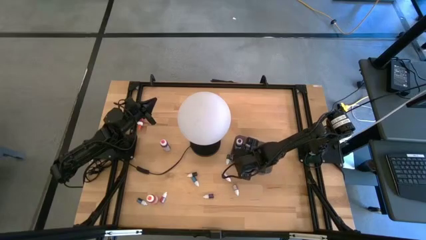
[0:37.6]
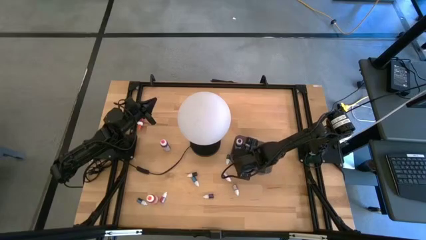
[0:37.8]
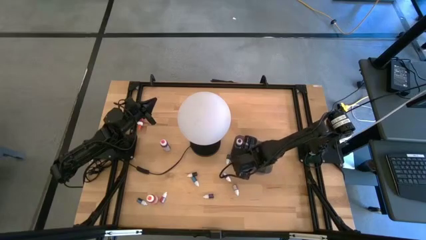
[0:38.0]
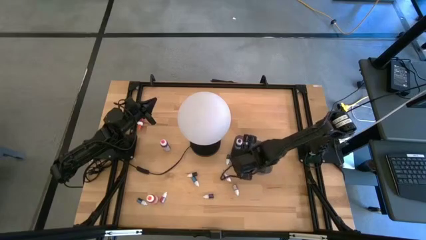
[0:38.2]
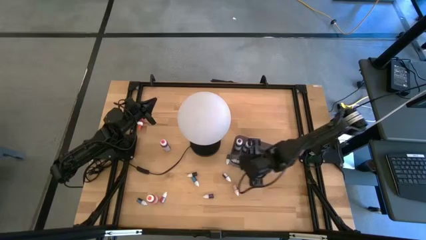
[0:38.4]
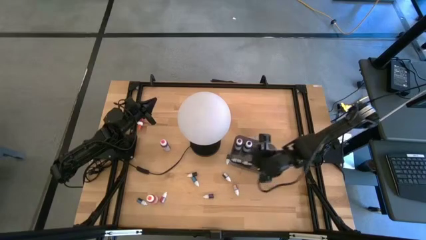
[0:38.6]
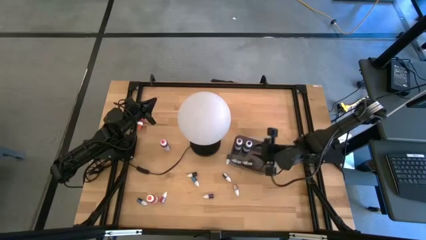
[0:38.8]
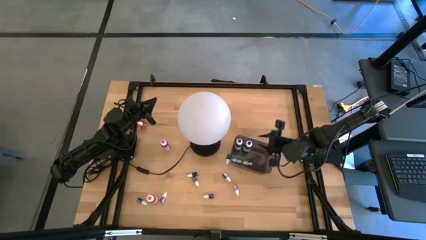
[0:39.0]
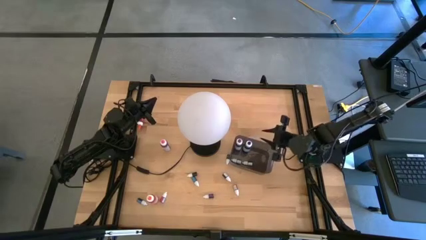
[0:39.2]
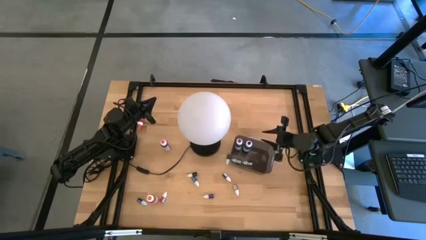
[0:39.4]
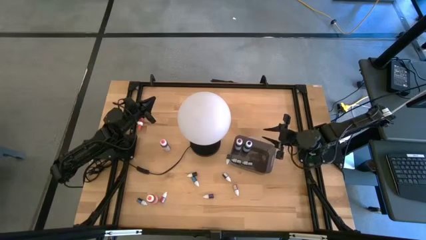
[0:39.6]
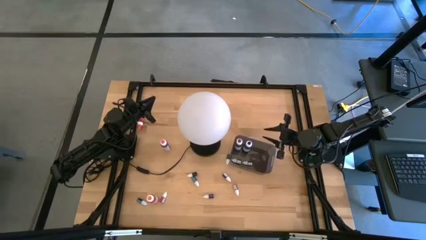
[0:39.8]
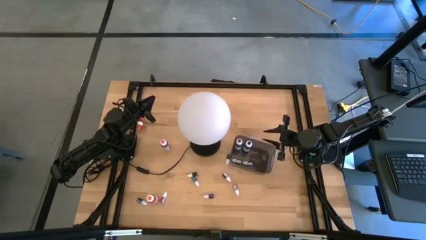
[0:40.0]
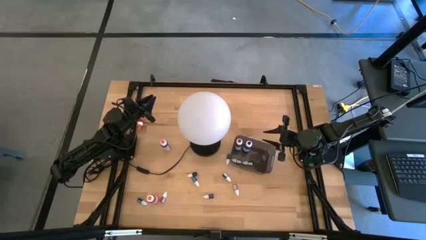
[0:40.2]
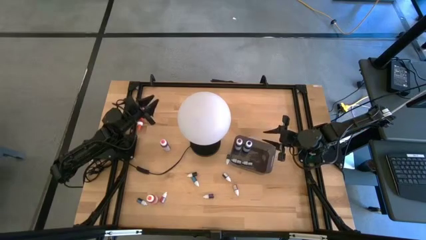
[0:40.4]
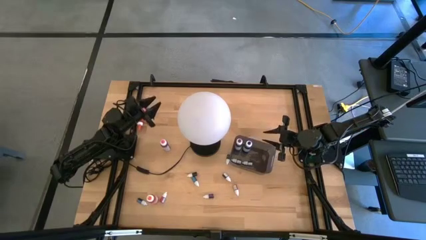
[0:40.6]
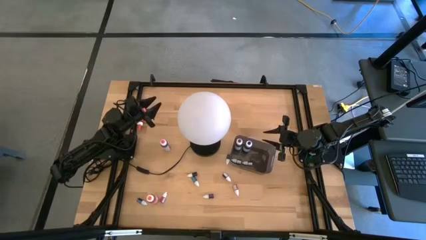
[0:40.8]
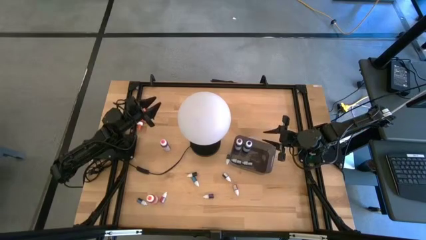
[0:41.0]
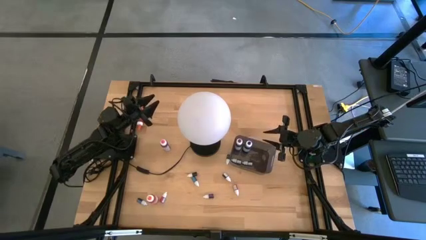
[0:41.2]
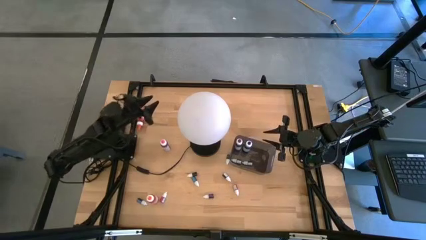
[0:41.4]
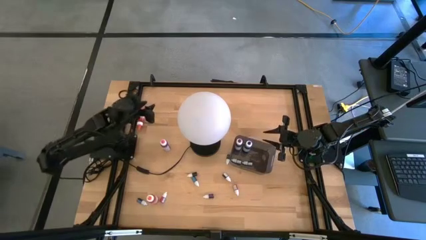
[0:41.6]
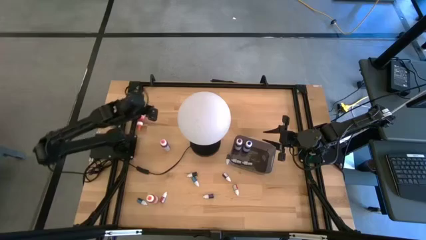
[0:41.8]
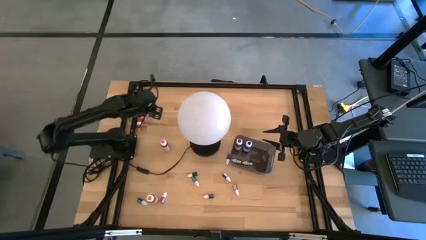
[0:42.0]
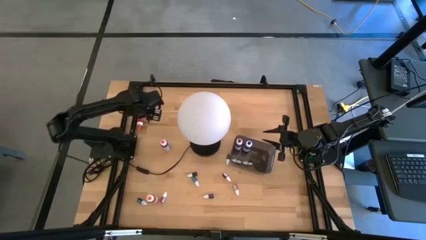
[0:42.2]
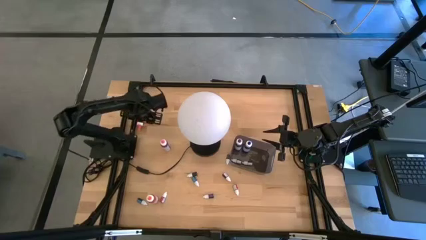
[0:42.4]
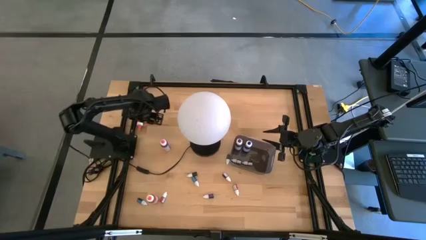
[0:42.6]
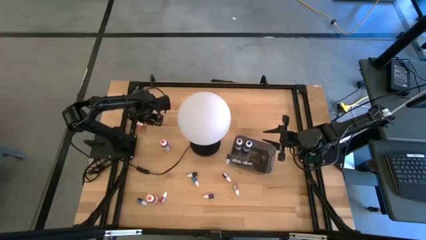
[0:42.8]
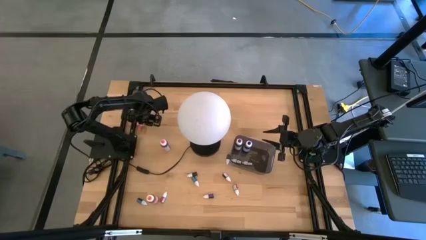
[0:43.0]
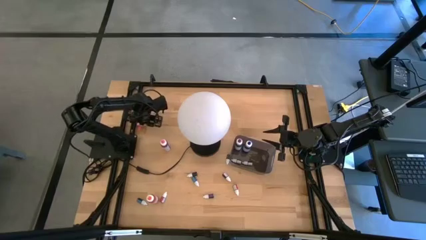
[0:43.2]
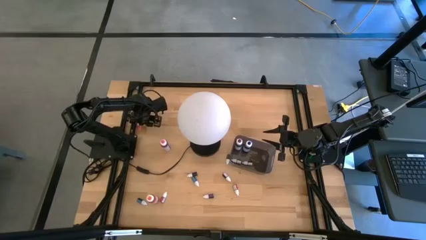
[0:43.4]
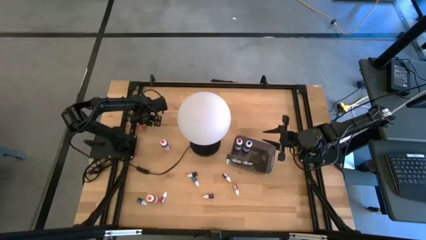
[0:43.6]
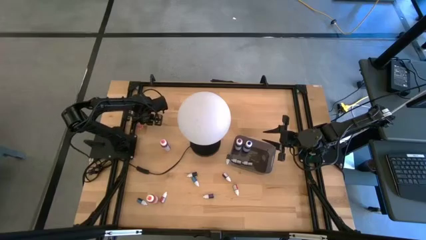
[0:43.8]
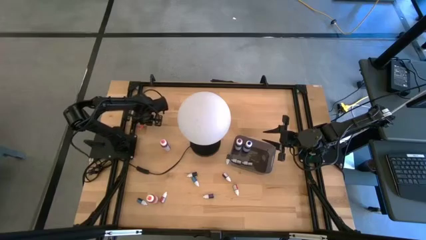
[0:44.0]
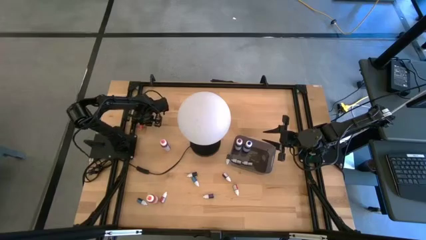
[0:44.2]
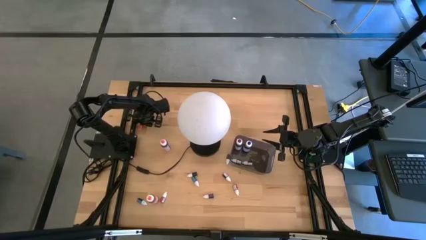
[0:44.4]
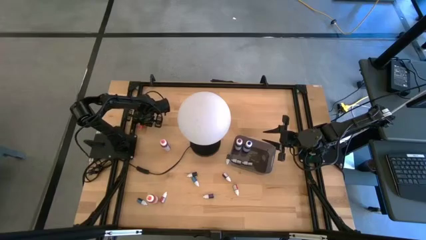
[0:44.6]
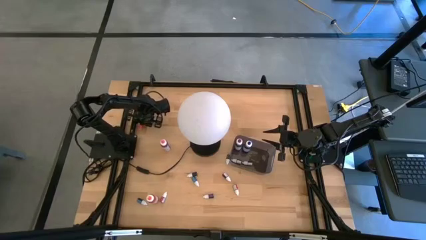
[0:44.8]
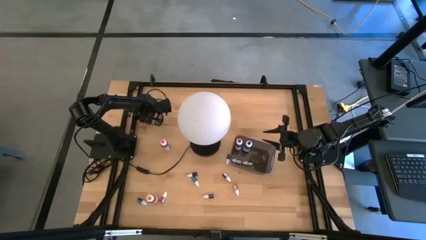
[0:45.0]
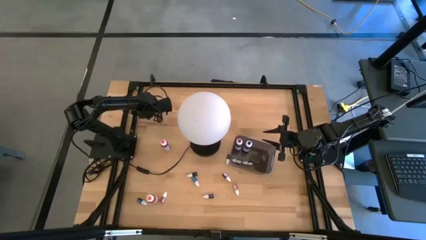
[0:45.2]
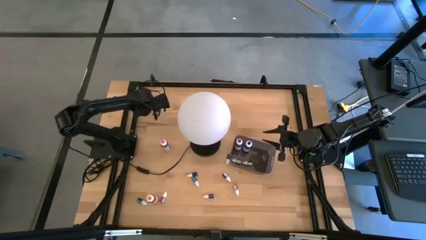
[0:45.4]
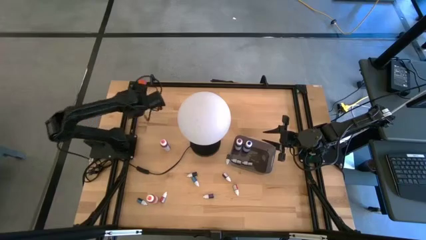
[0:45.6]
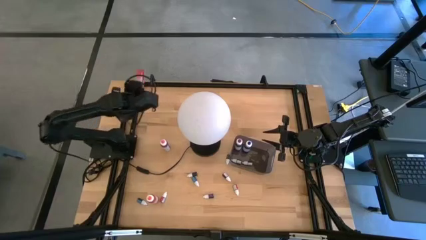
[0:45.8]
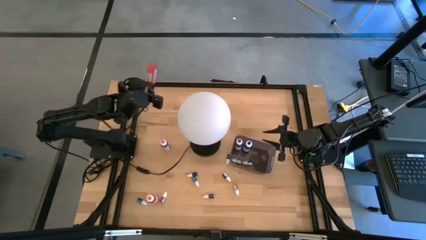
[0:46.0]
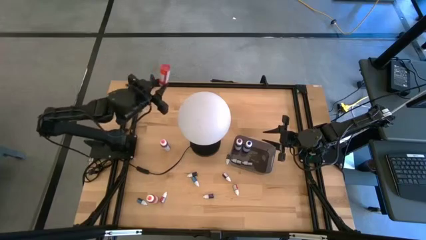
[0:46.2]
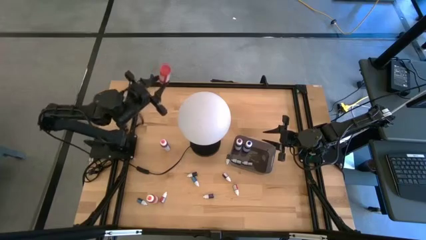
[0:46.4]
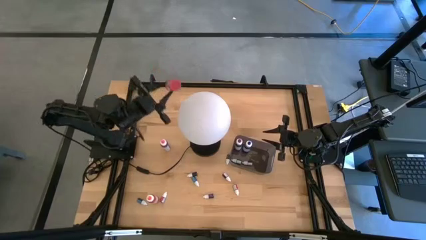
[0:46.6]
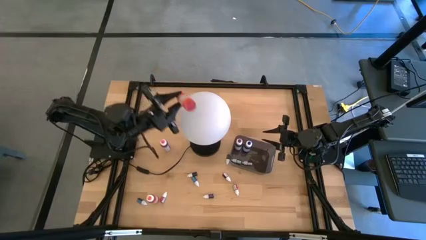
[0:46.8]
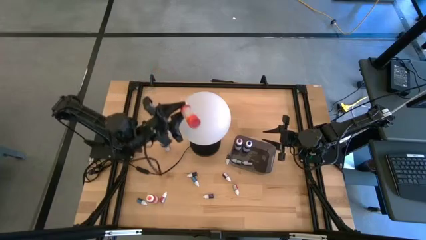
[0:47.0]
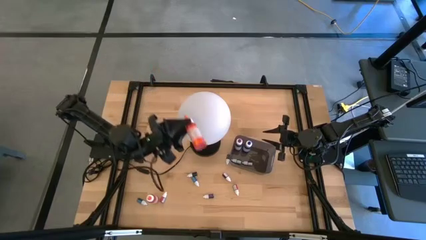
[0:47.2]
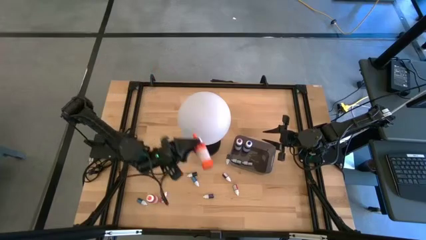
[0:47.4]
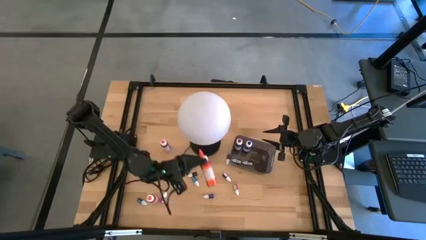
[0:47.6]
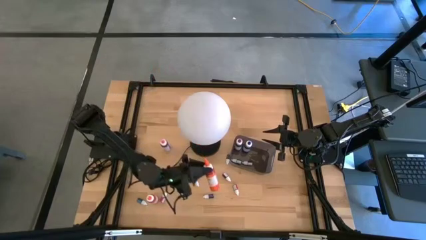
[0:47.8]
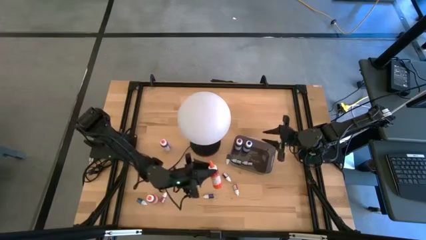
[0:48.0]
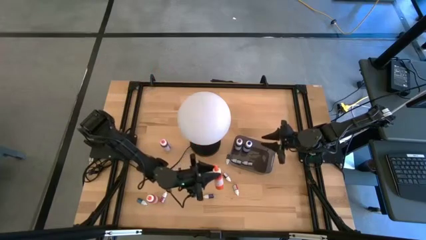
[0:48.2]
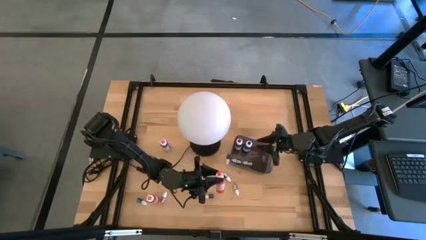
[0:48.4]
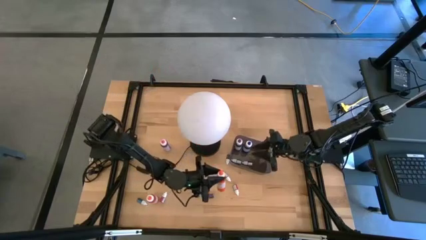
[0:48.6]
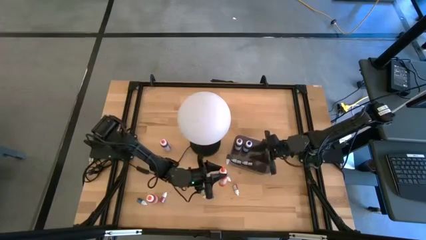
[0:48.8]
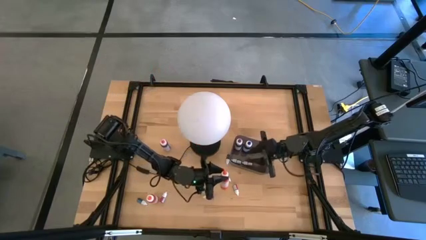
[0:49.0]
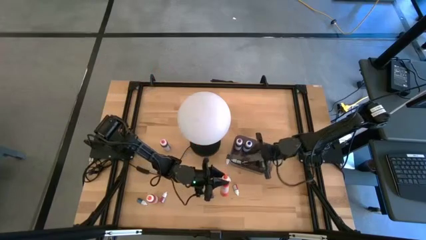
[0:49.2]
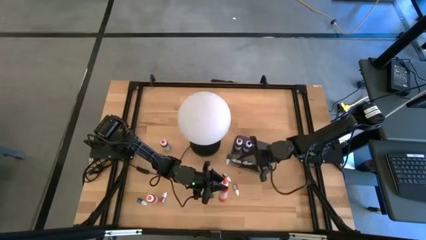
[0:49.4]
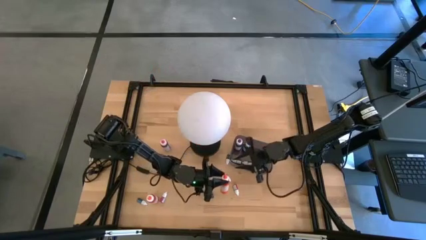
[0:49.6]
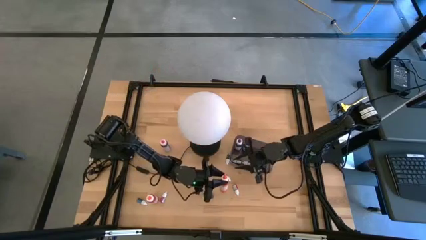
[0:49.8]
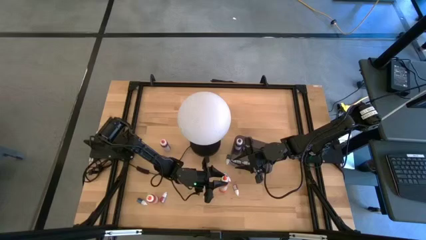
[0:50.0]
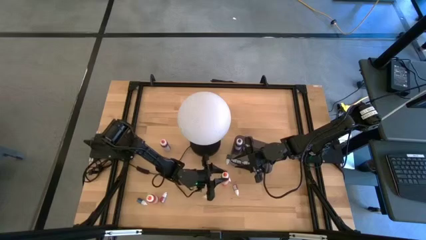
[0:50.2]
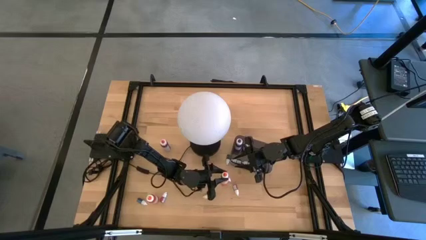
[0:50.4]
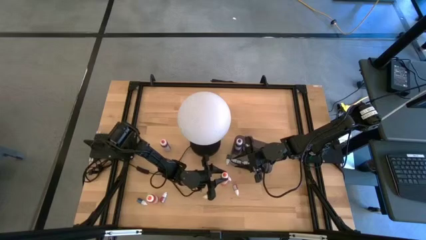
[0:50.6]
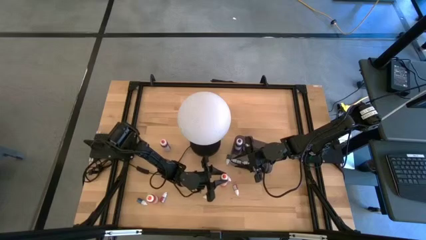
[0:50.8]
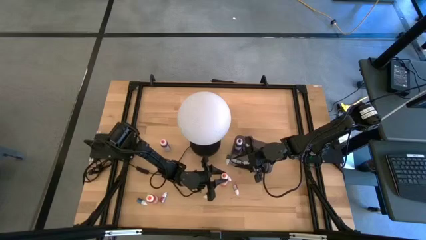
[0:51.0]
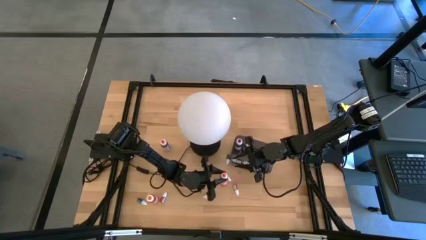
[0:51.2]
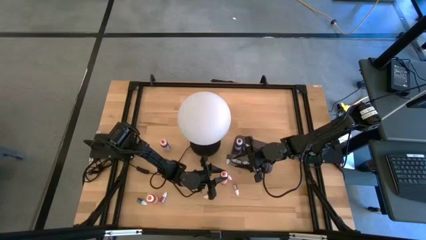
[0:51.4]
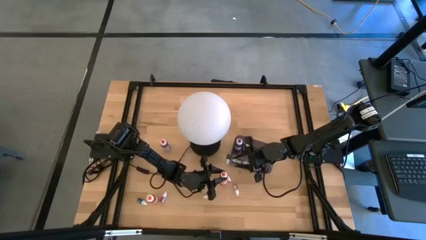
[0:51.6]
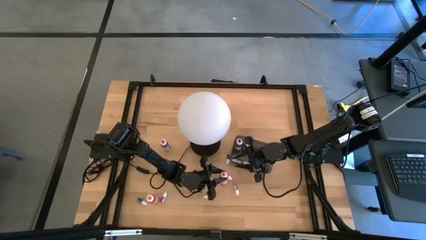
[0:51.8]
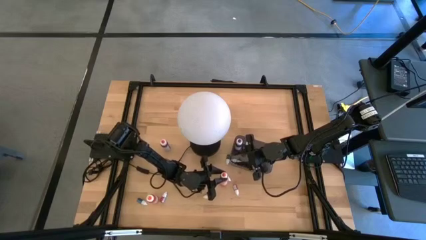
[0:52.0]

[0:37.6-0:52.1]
Task: Pick & Place food coloring
Put the top large orange food coloring bottle into the black container
